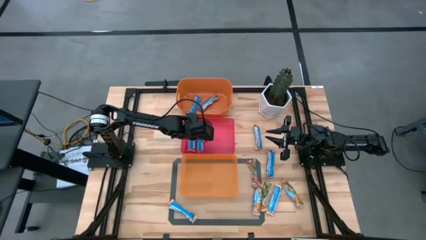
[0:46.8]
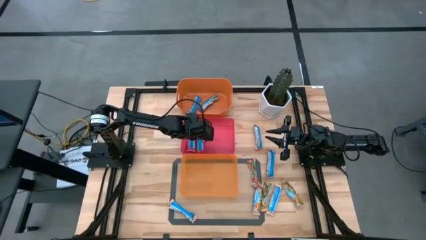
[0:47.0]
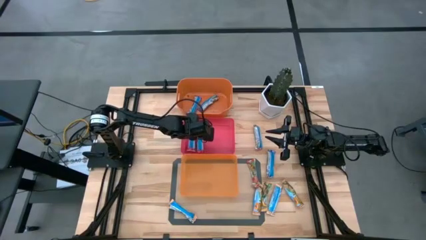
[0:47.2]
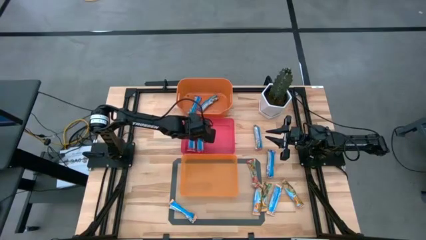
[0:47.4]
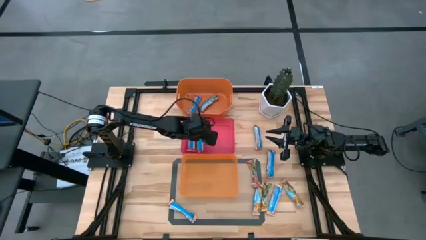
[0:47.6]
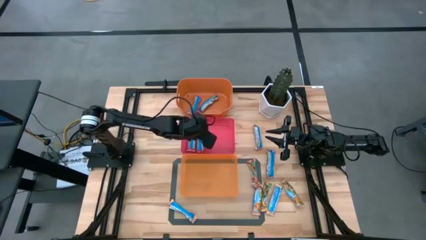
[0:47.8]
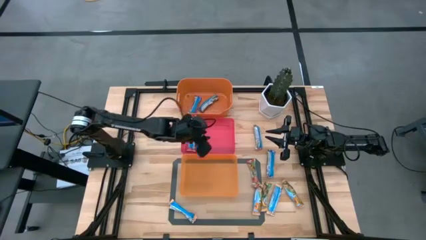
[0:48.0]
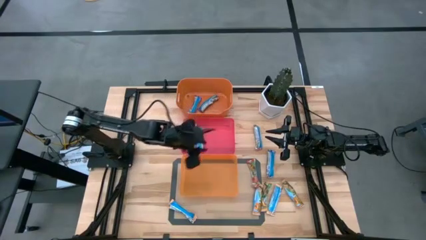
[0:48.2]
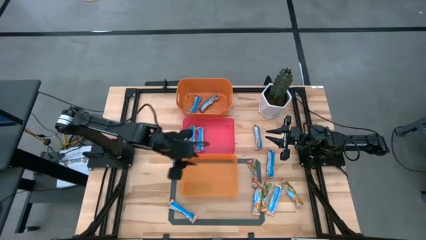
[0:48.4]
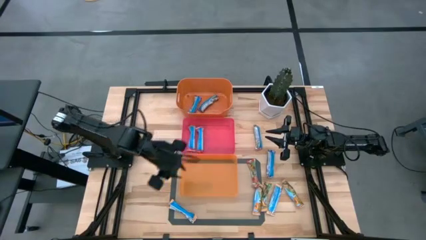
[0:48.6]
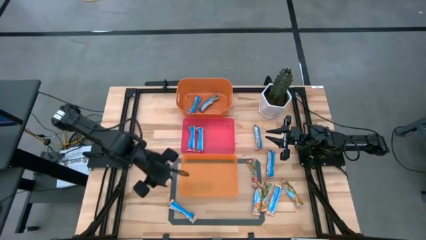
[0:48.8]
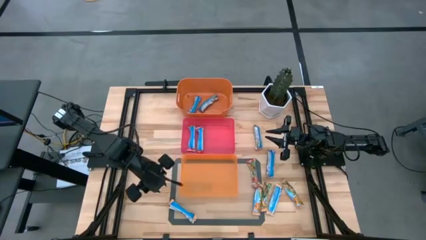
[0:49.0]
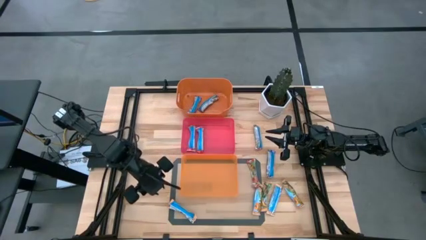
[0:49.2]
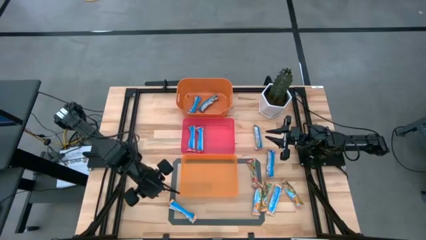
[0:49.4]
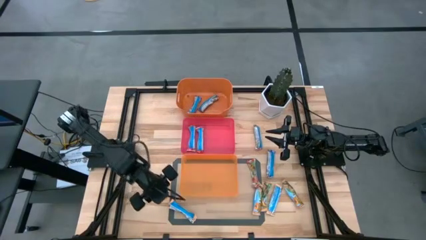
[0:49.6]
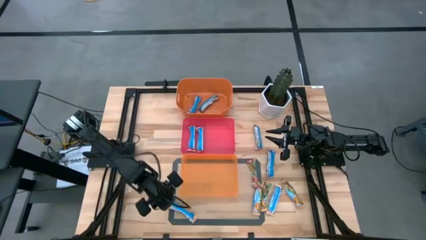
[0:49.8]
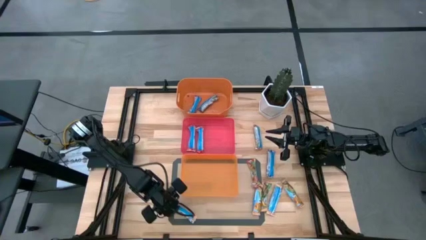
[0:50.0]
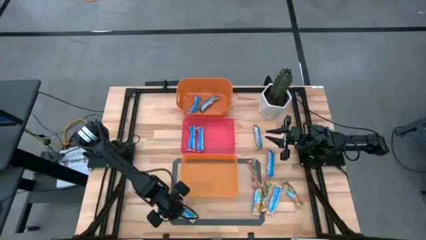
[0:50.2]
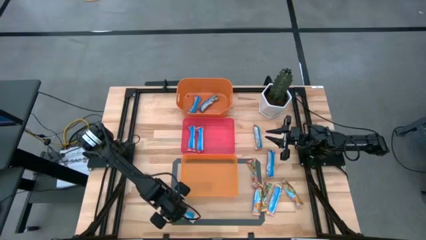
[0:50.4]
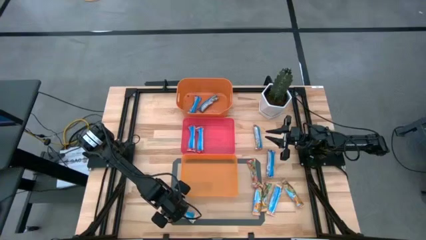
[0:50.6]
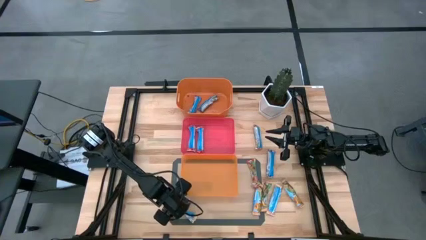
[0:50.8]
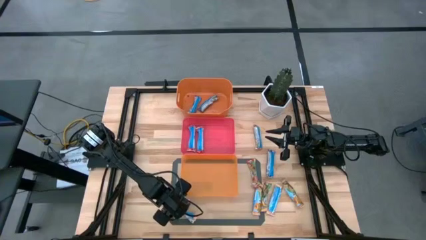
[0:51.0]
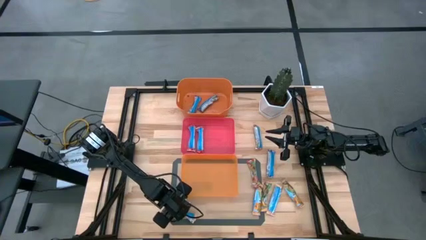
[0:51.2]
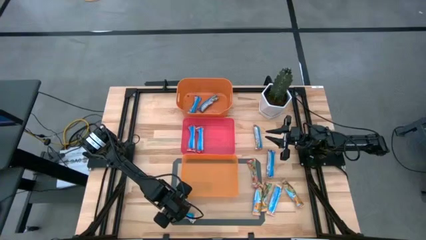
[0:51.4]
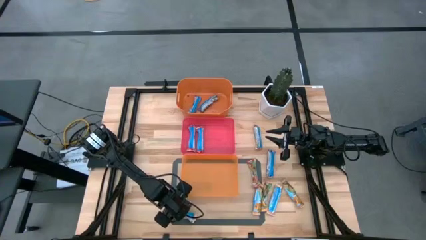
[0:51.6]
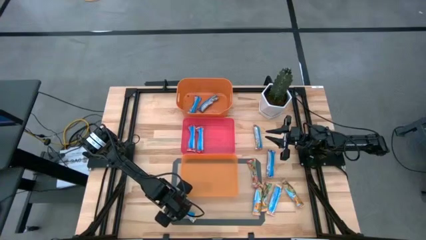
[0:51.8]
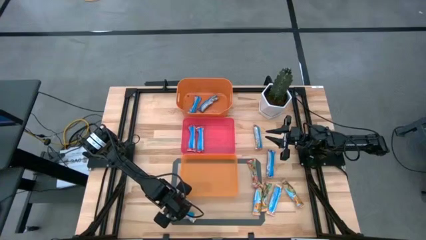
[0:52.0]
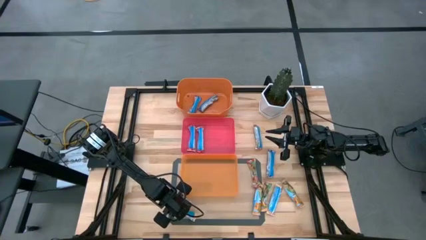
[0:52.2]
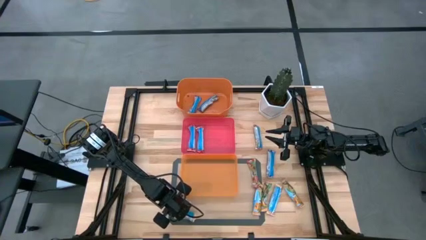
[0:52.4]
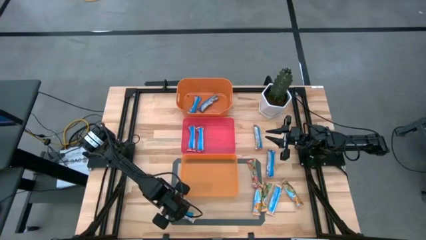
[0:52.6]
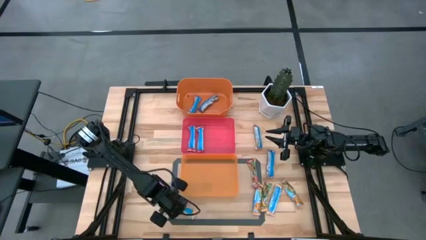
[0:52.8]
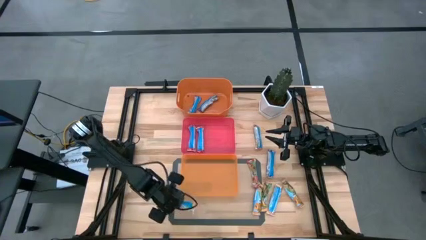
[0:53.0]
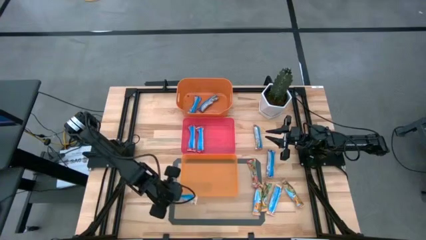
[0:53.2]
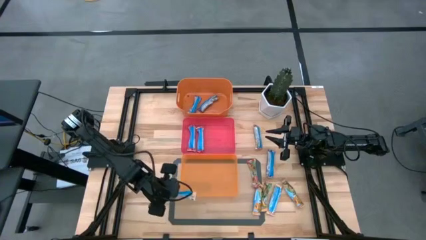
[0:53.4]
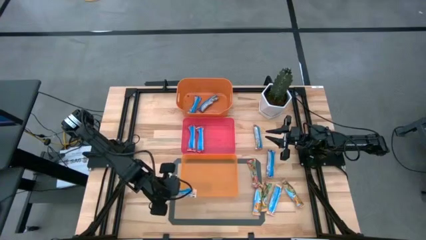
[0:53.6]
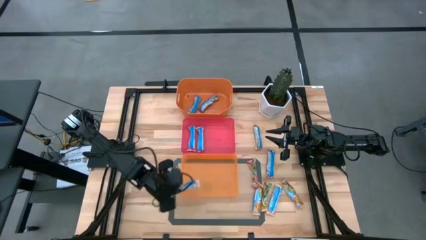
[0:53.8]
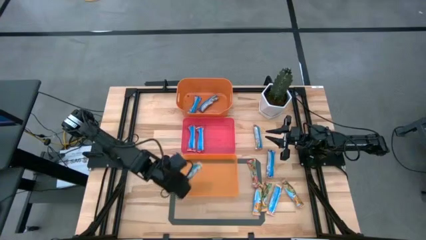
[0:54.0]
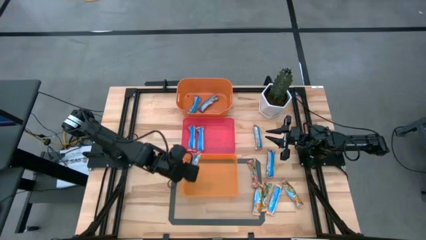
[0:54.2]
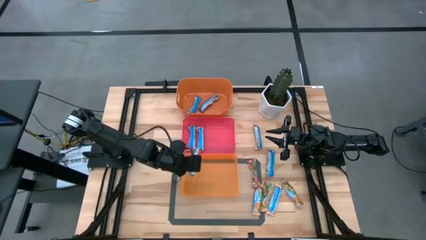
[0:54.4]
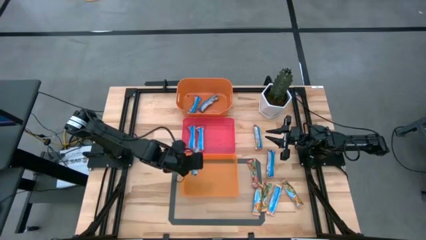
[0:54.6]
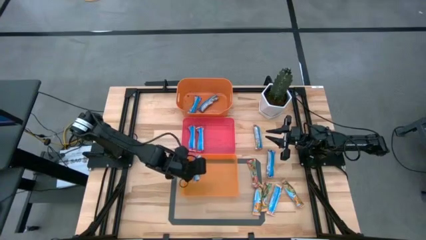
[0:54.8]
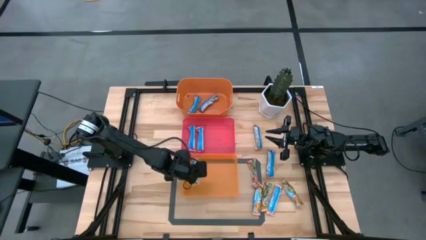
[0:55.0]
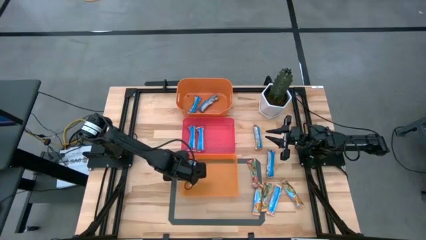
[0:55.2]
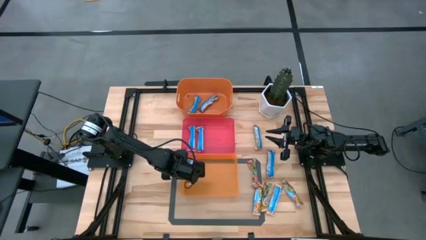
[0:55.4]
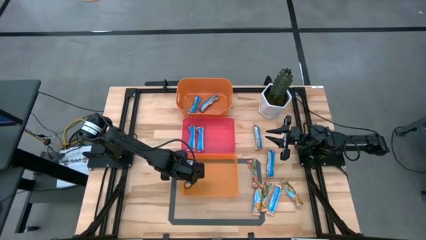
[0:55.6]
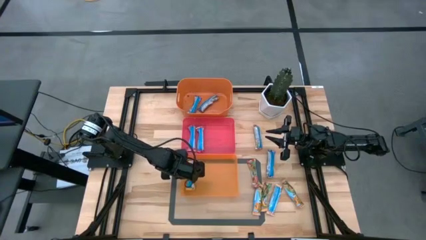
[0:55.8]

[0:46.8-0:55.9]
Task: Pick and place Granola Bars by type
Put the yellow granola bar into the bottom orange bin

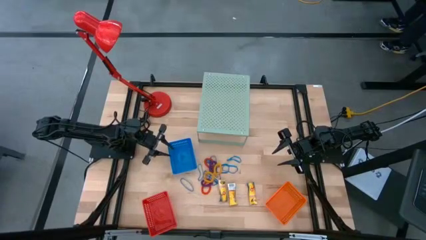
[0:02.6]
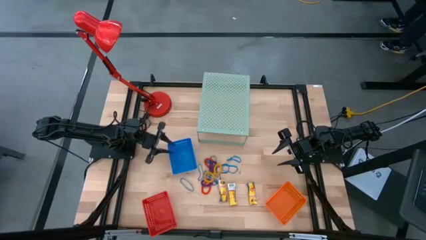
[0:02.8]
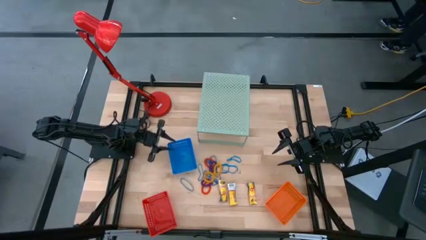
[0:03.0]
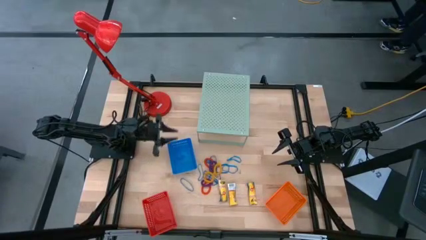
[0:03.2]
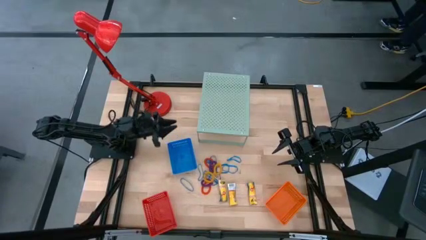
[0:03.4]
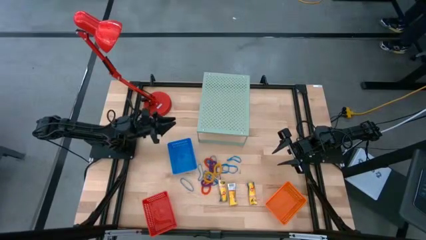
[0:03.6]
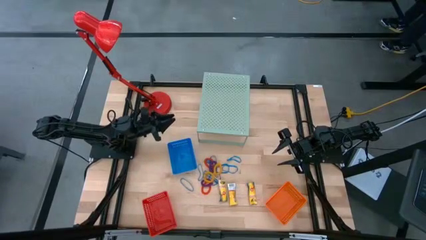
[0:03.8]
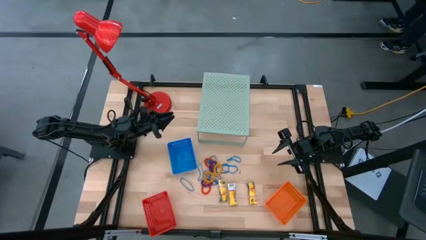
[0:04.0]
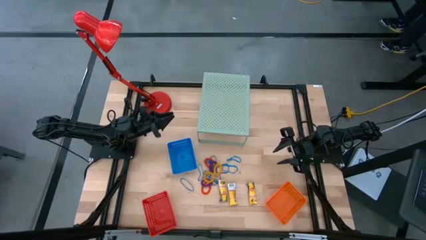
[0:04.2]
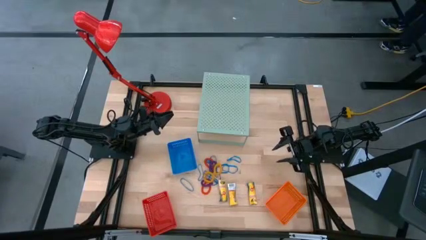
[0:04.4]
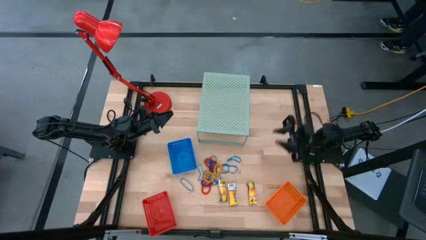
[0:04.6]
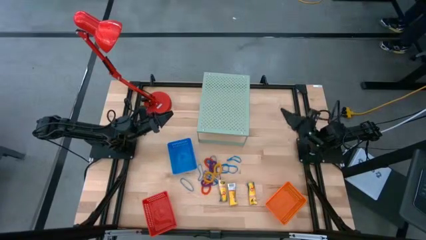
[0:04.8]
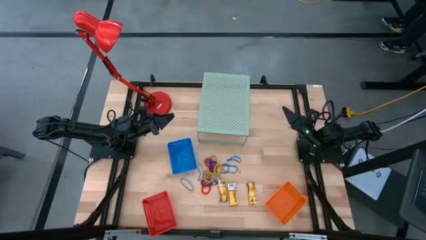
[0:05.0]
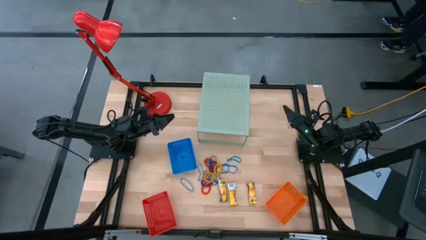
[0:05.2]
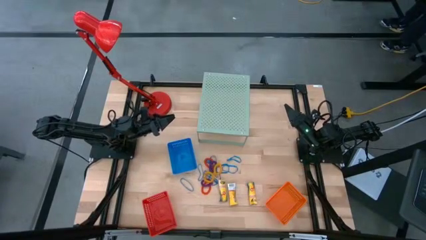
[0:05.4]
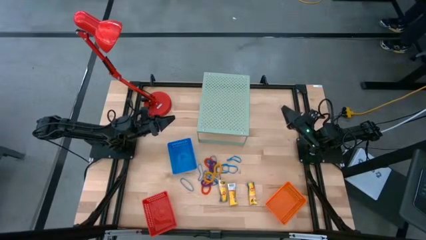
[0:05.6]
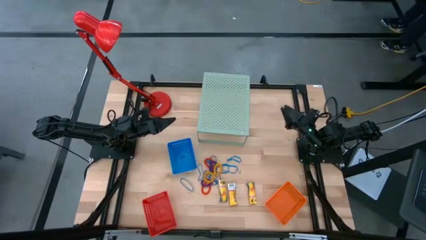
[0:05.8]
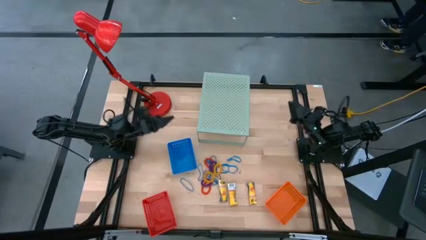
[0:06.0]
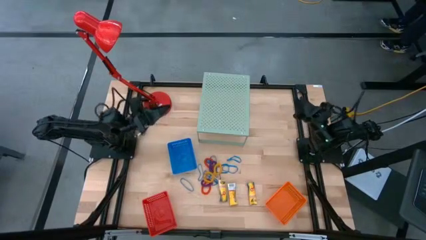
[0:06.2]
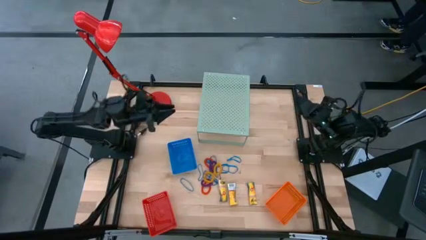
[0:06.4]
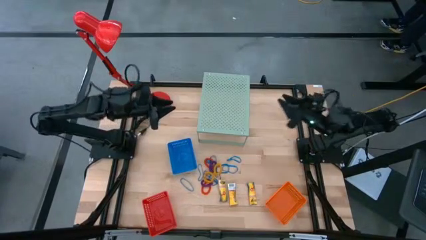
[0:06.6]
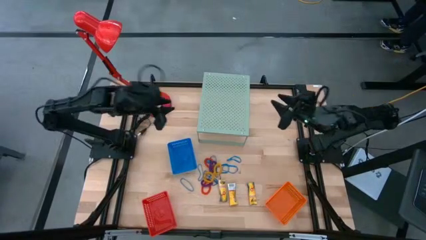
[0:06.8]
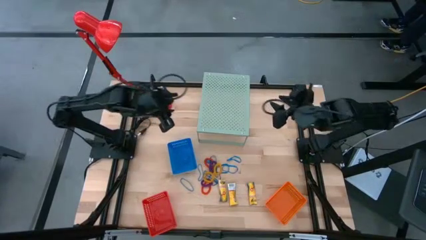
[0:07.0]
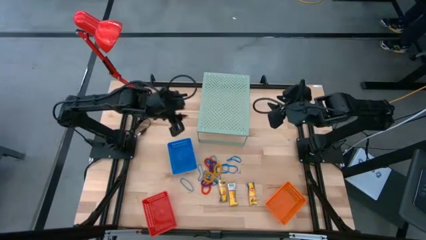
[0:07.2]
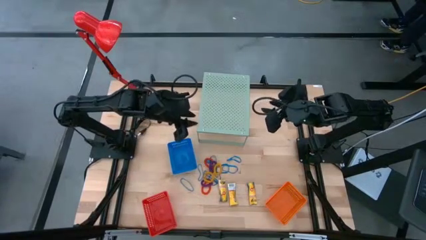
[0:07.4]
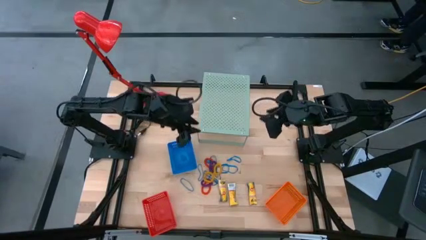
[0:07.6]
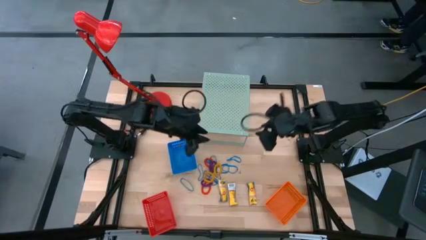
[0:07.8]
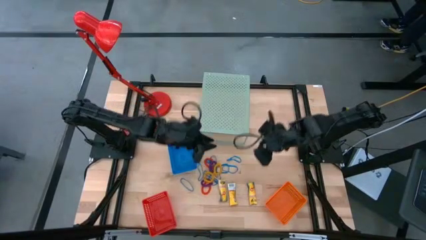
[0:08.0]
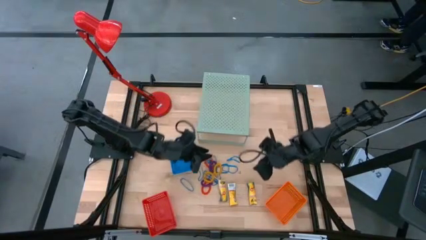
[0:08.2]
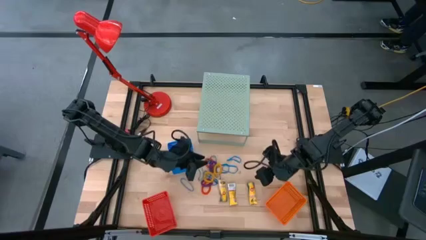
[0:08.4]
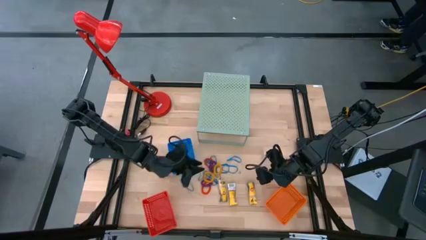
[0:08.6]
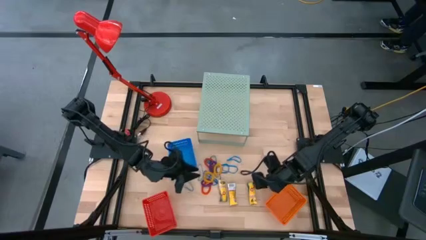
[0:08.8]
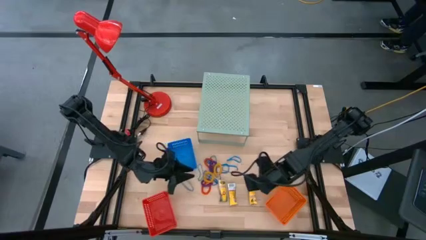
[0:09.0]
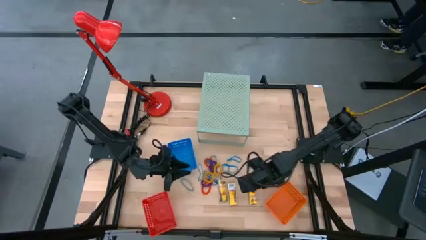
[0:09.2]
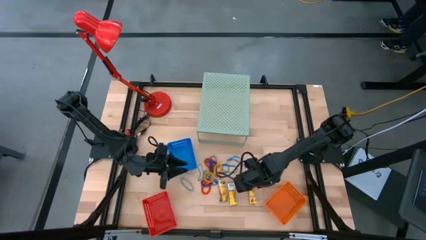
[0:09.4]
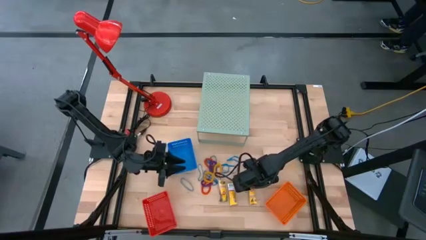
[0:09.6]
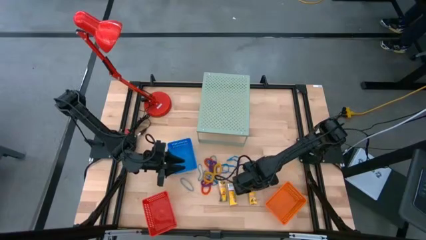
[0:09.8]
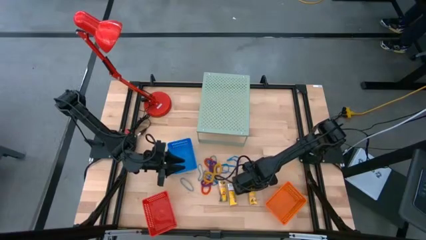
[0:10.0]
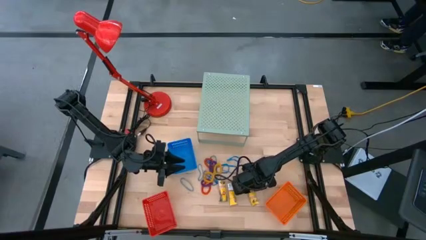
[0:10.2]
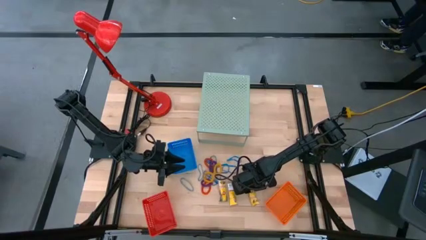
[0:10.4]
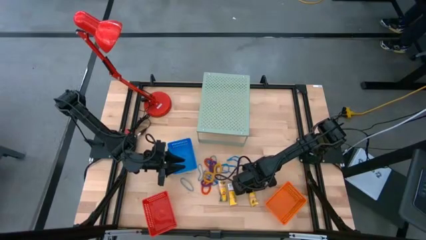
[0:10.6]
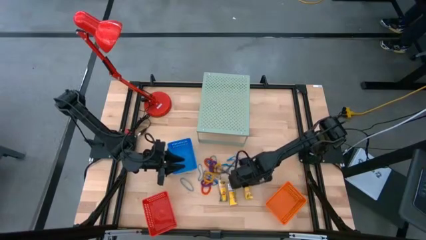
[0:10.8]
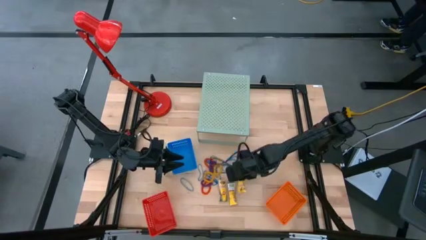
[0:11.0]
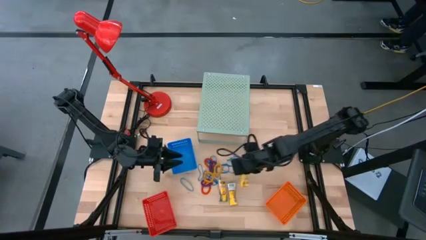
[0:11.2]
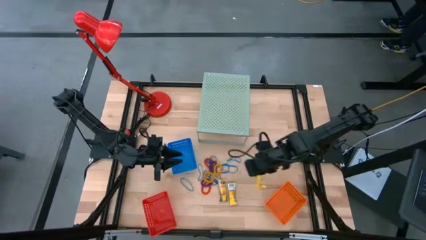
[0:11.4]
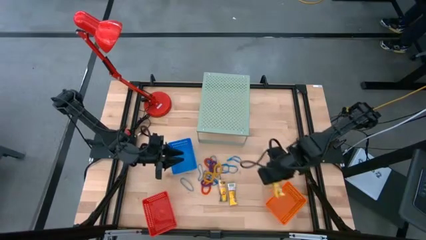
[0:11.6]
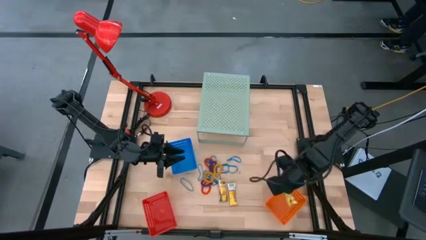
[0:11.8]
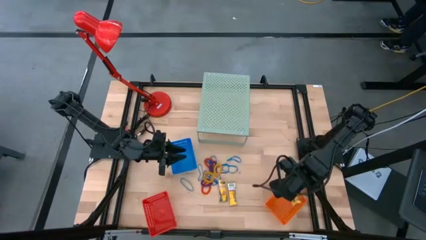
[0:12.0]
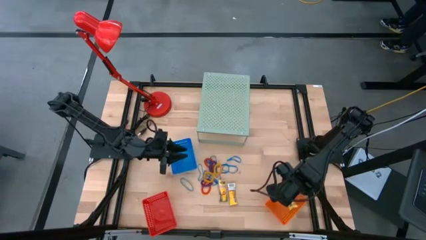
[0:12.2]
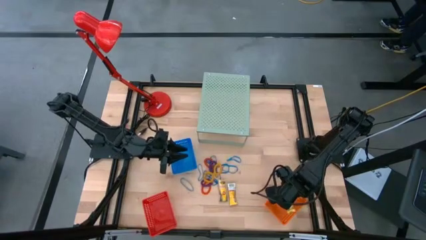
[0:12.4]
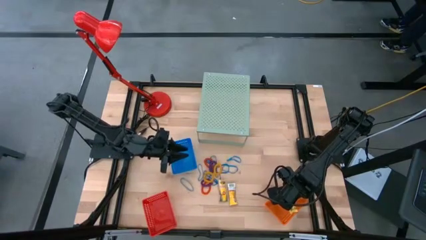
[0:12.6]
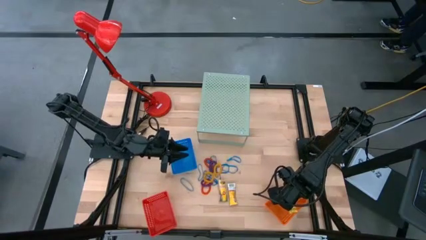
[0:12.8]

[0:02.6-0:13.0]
Task: Pick & Place Office Desk Supplies
Put the yellow crayon box into the orange basket
